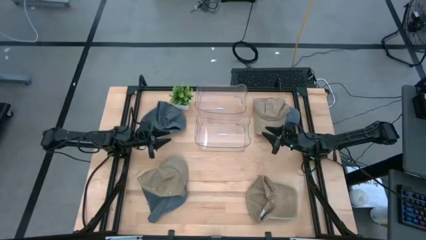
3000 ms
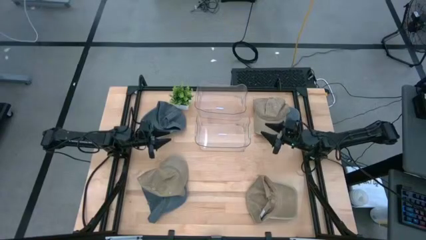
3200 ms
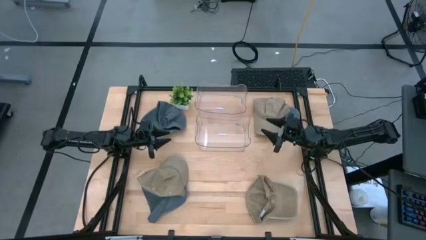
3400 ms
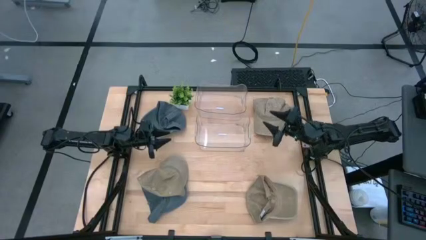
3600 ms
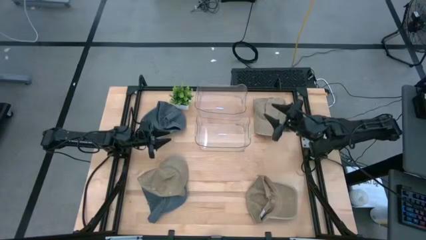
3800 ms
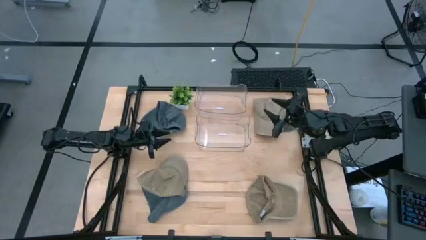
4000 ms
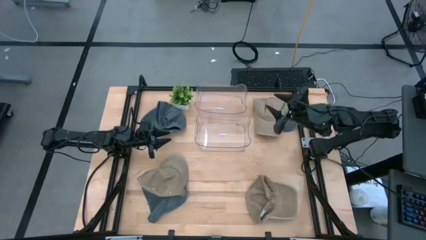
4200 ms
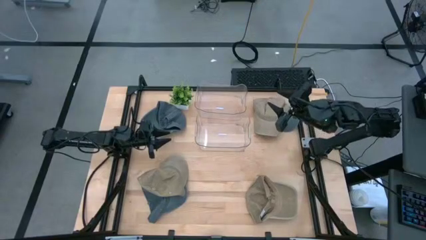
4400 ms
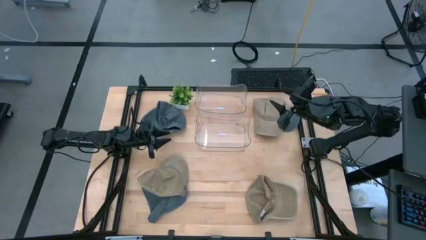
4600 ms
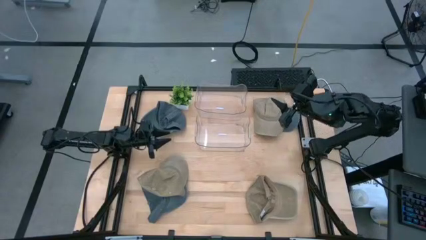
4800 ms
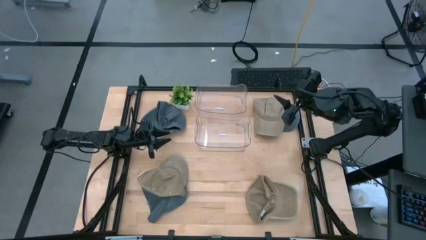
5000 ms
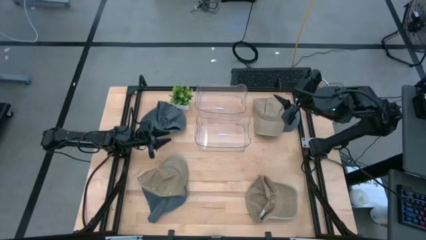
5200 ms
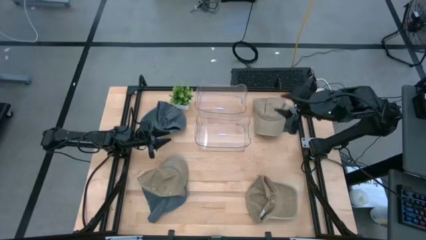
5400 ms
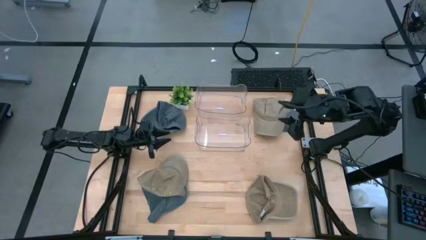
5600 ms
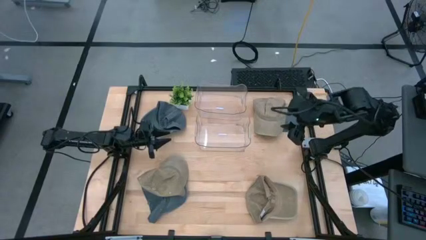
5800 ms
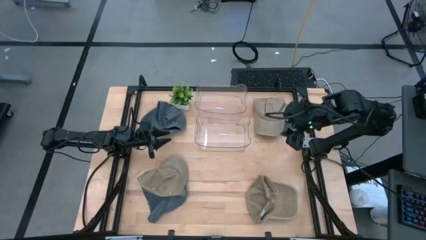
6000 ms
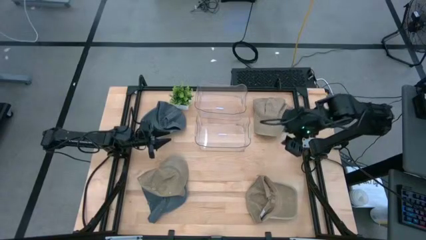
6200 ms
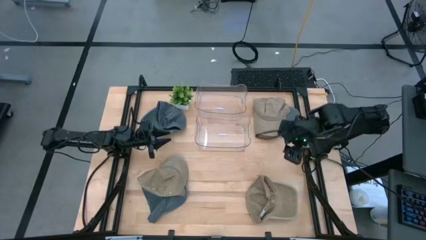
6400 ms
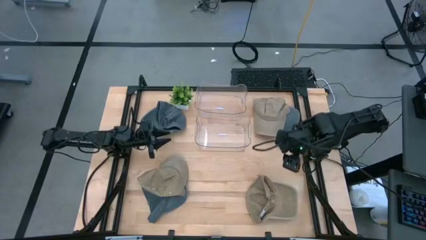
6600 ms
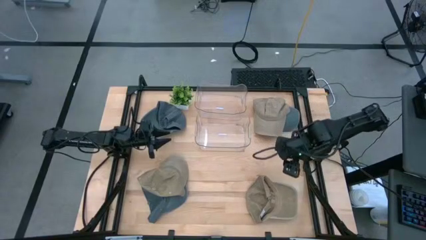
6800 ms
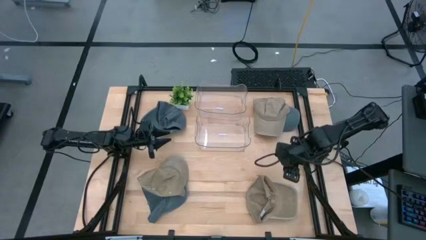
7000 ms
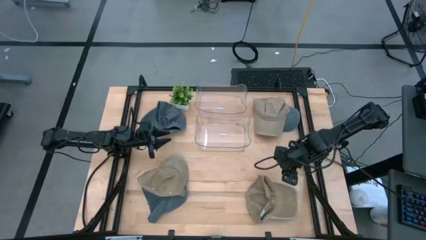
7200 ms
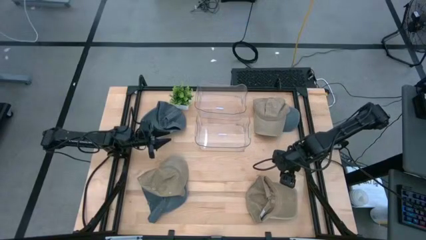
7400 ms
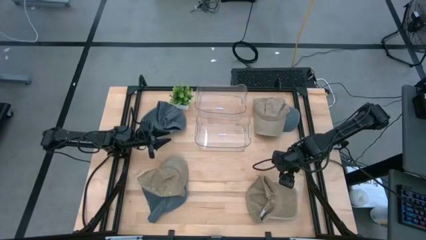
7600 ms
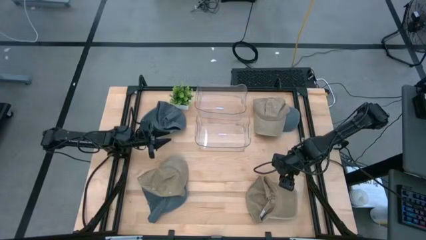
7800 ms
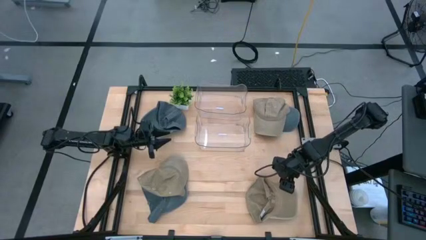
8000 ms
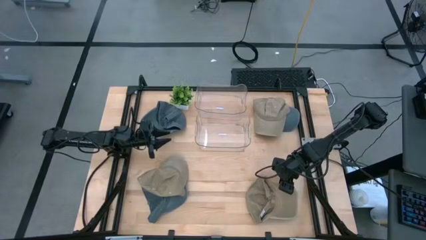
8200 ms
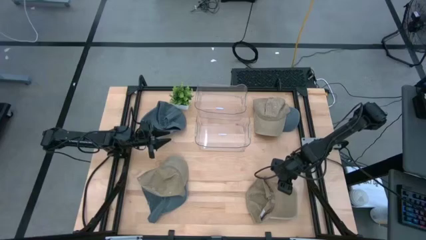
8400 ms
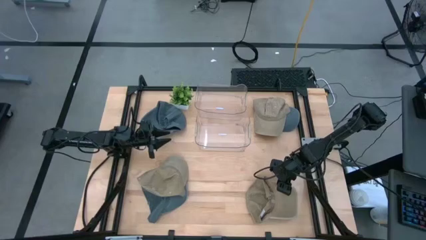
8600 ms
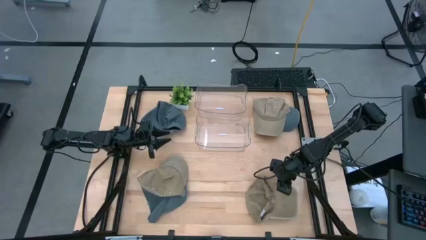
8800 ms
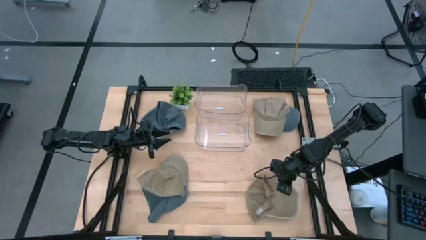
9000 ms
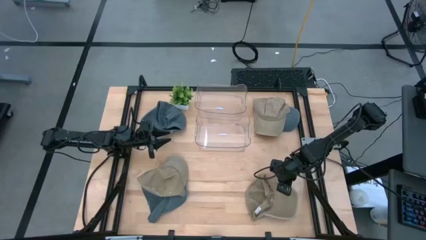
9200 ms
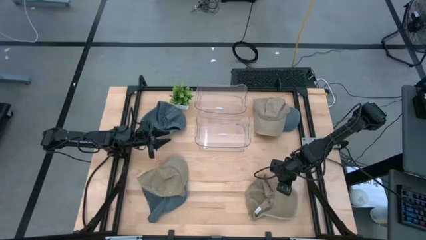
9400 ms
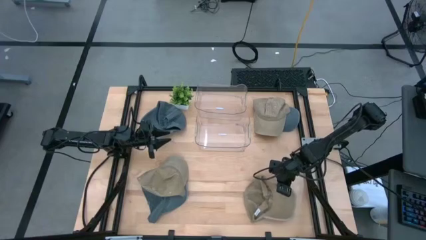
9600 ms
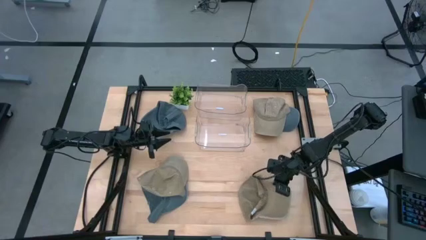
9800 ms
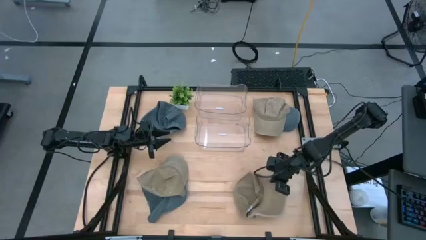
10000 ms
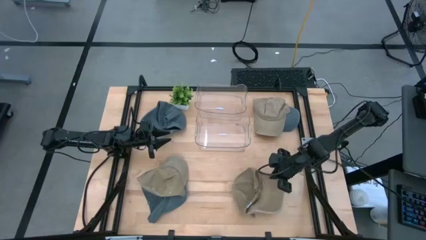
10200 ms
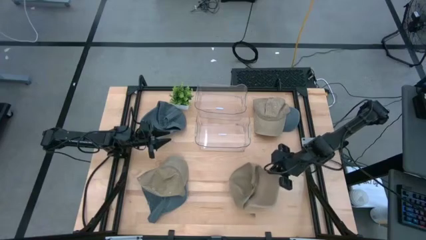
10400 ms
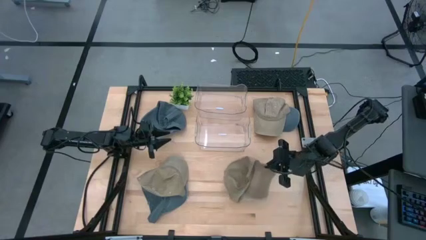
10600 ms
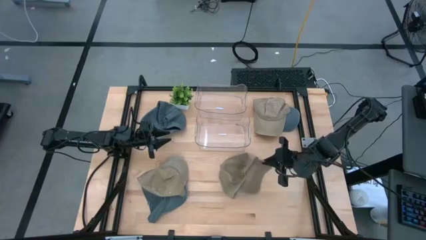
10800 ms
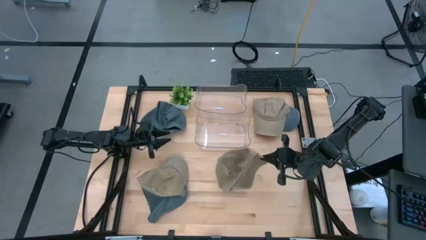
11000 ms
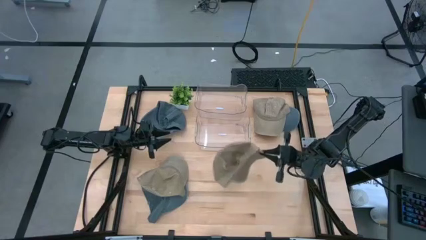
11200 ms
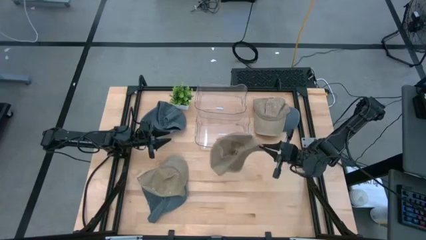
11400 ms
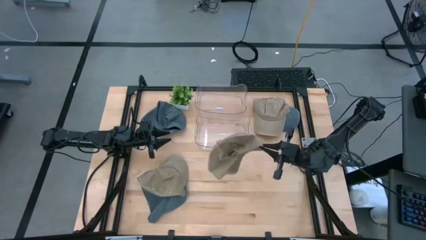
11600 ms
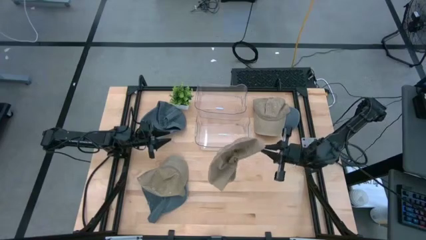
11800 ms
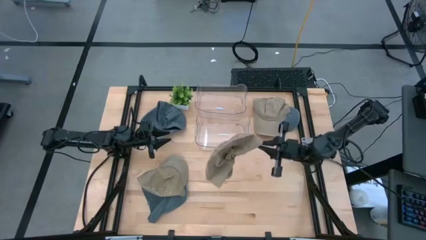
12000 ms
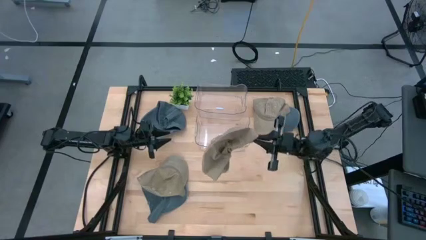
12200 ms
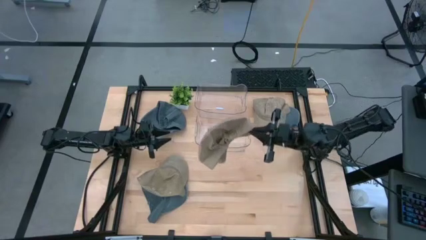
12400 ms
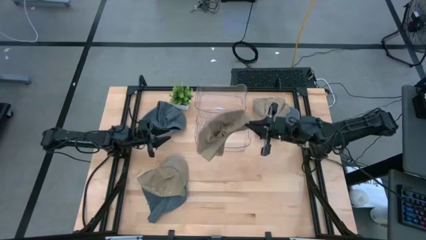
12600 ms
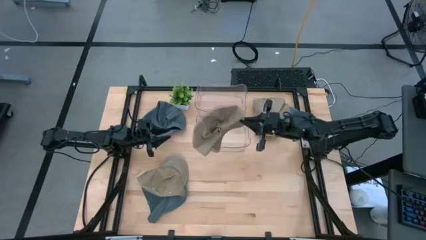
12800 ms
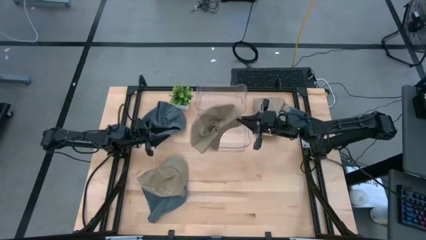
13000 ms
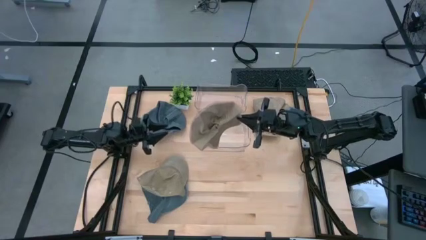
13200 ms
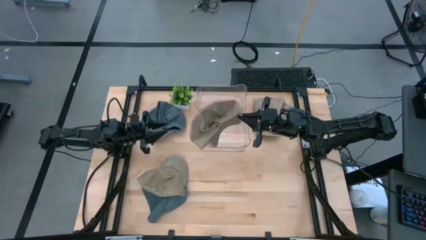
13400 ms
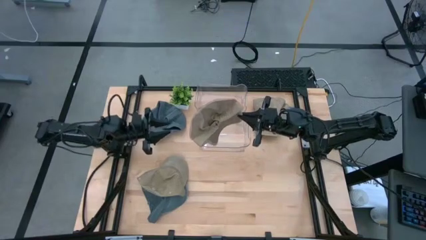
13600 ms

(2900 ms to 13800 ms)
Task: Pick & Place hat
Put the bottom right brown cap into the bottom transparent bin

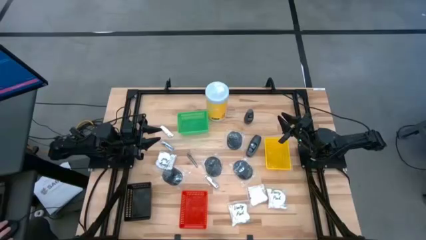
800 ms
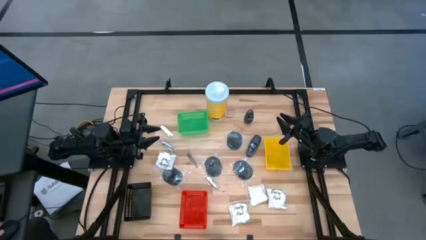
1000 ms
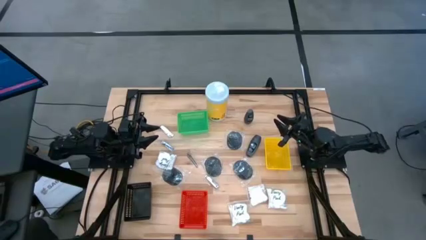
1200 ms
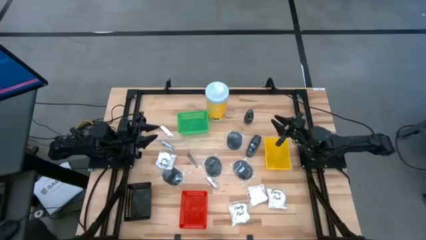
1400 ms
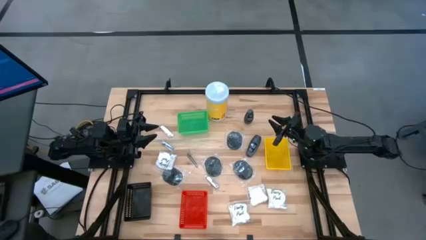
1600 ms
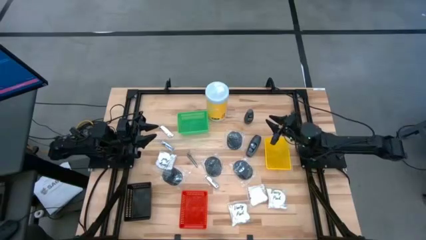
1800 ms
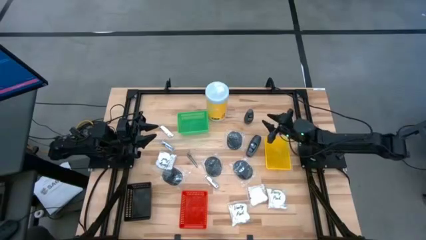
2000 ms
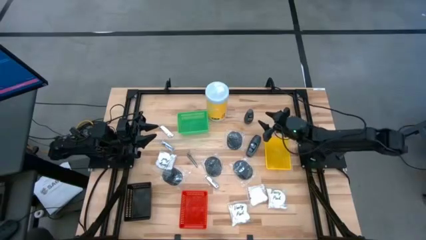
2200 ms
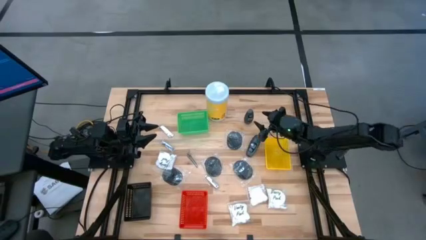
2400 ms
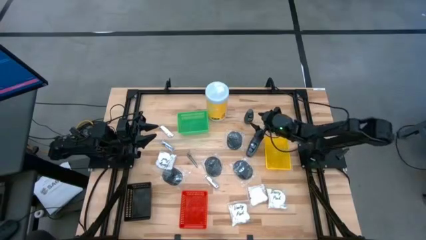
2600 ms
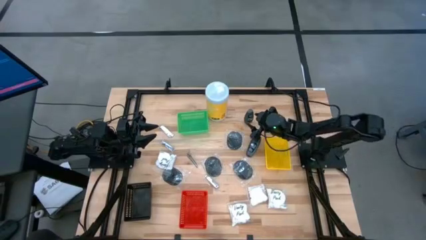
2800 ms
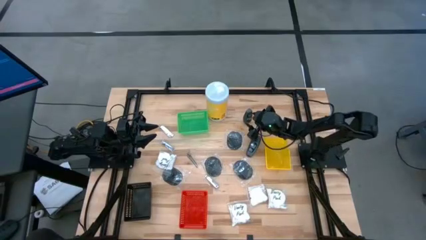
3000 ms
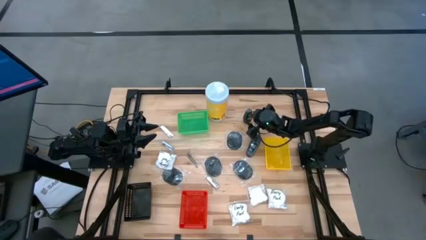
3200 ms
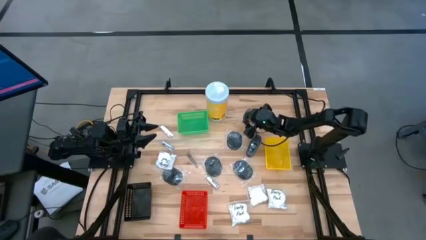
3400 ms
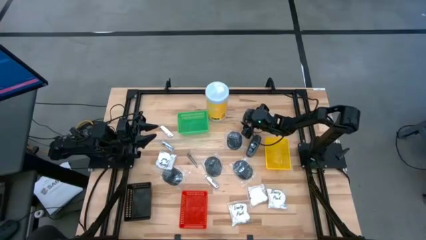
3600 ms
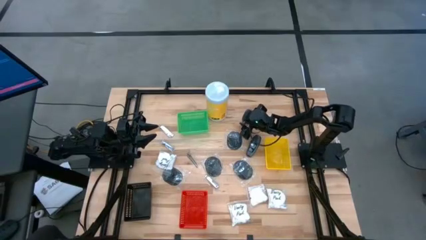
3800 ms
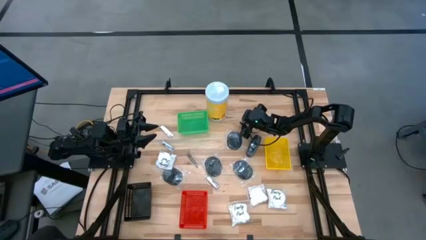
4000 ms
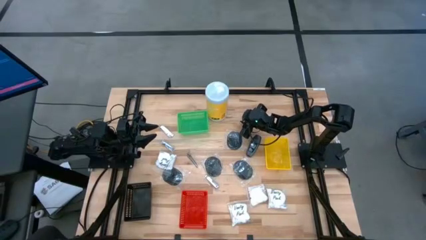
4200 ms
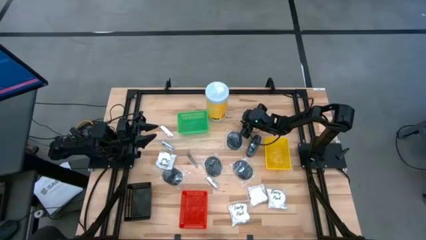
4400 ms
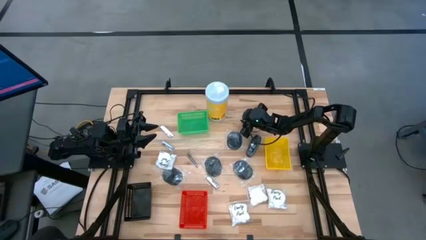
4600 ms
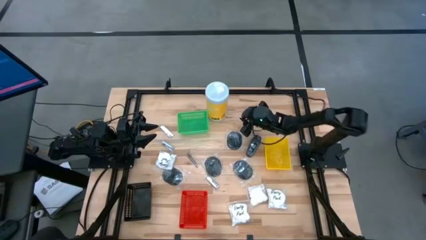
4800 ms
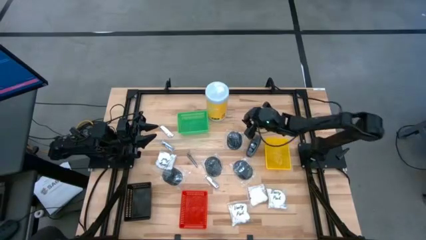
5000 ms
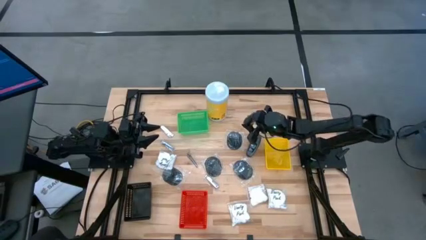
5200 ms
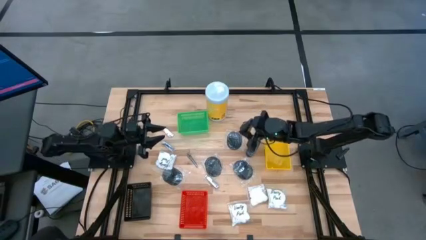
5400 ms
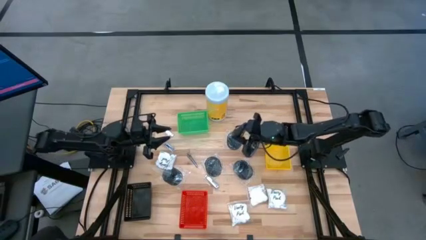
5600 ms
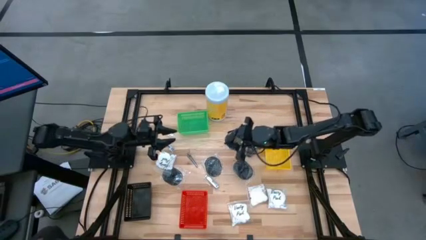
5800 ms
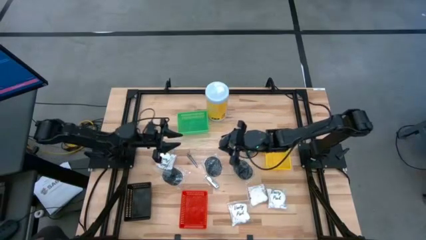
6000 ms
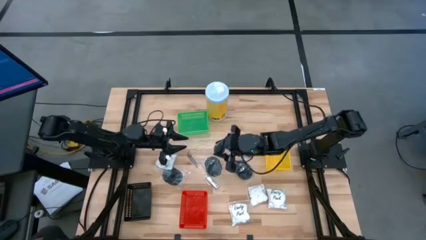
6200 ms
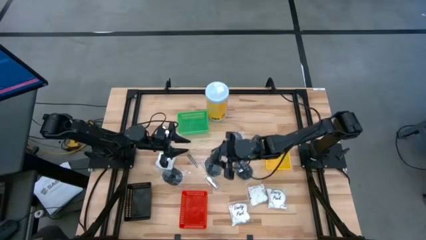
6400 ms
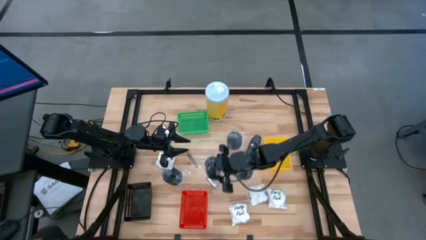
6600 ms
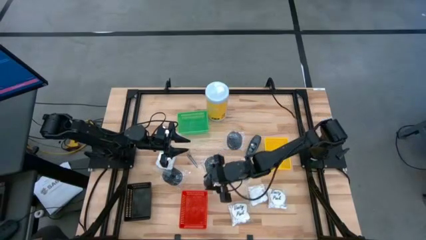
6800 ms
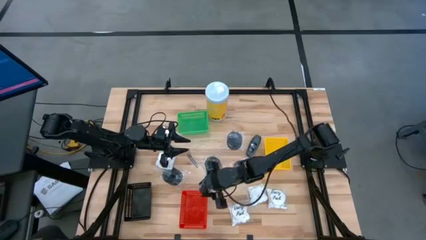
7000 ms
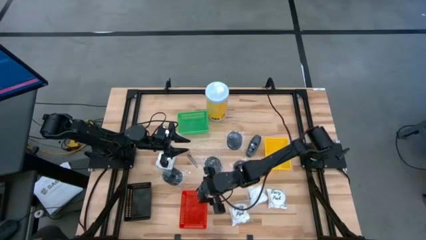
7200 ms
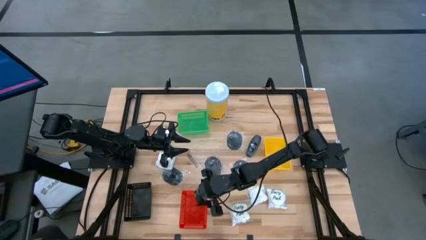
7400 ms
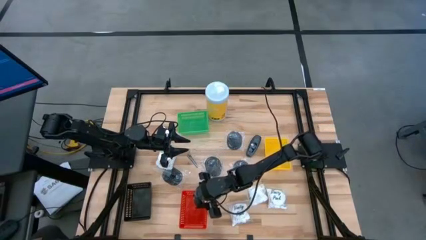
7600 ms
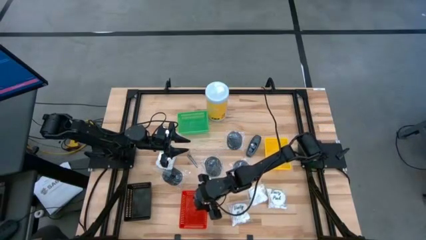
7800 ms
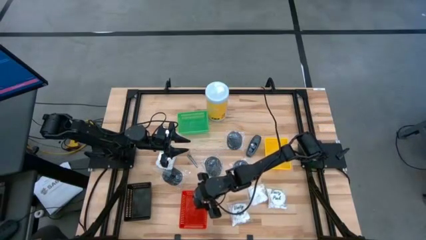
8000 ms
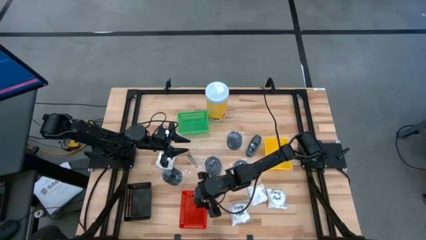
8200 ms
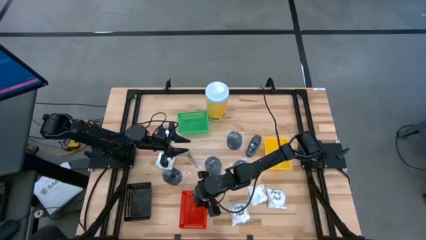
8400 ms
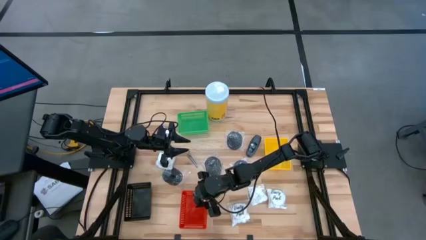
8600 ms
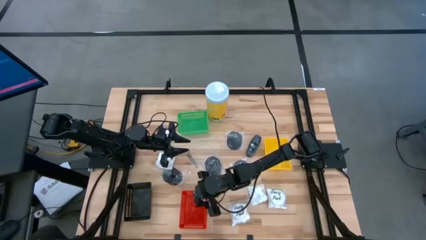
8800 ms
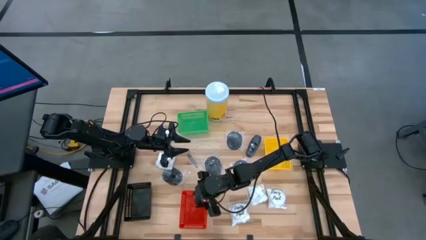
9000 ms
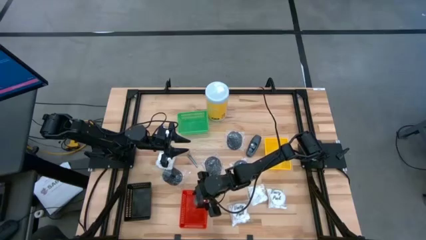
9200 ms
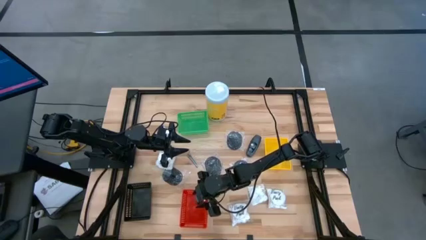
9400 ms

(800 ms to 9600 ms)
Task: Pick & Place Travel size toiletries
Put the gray deodorant into the red bin
